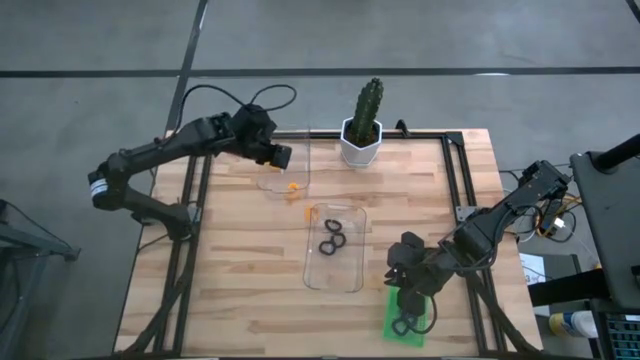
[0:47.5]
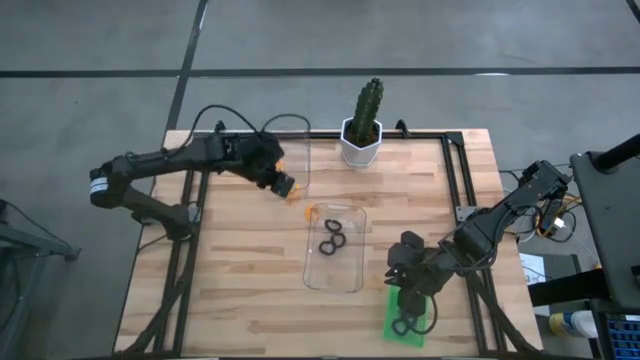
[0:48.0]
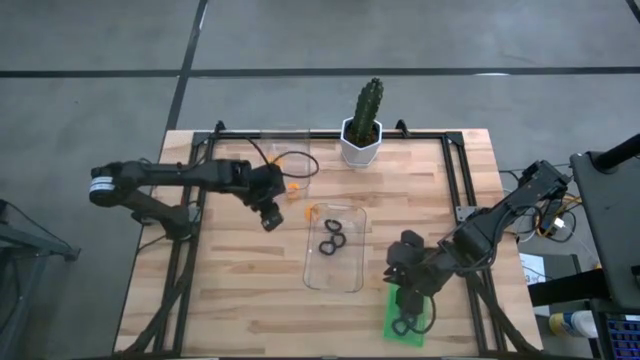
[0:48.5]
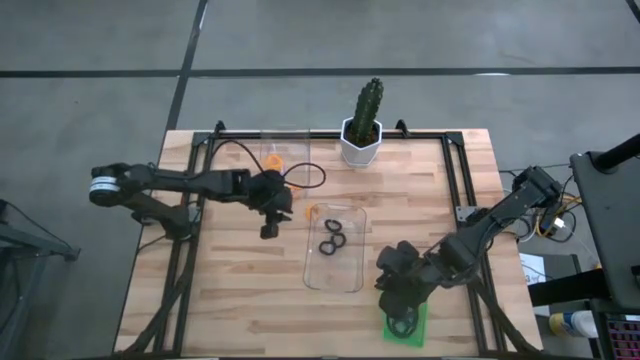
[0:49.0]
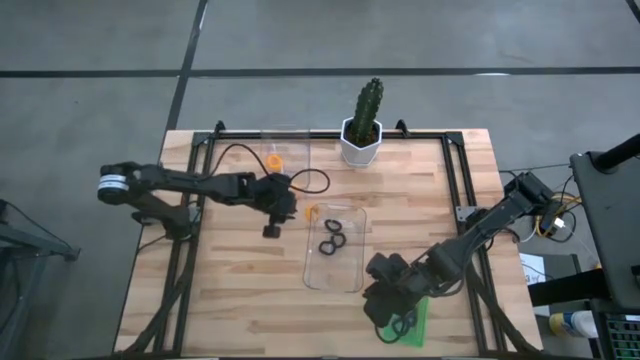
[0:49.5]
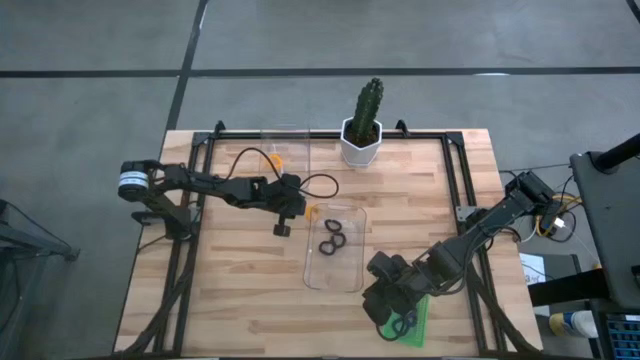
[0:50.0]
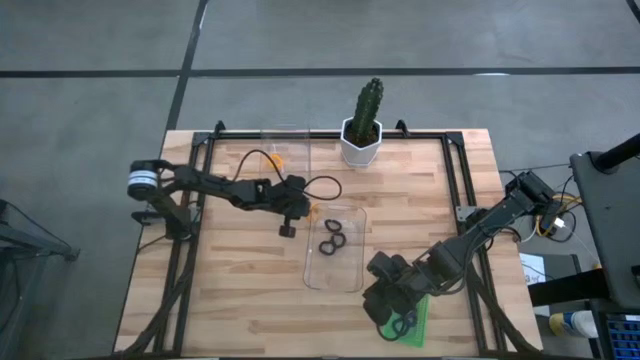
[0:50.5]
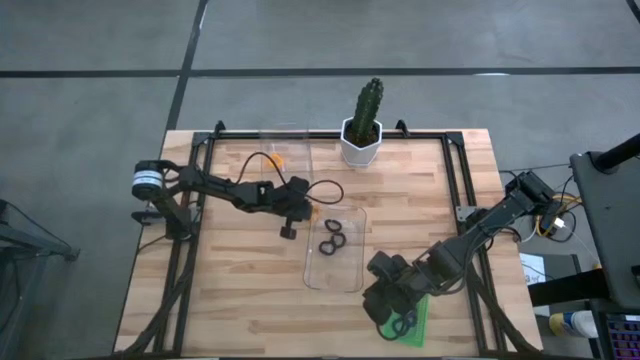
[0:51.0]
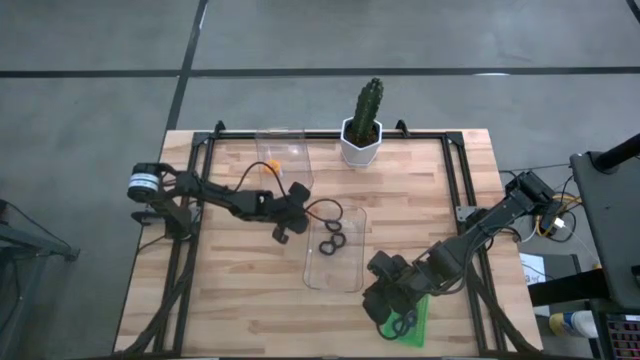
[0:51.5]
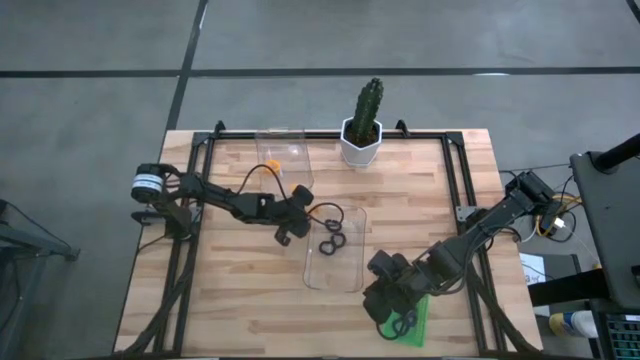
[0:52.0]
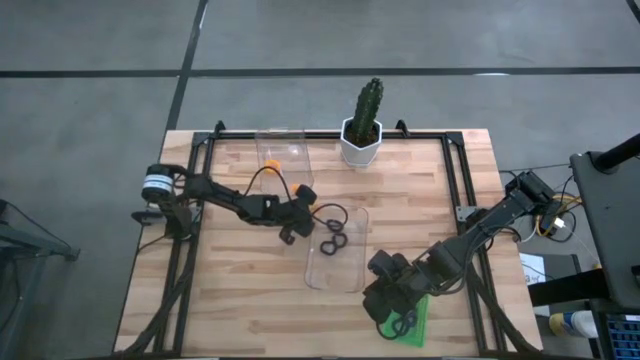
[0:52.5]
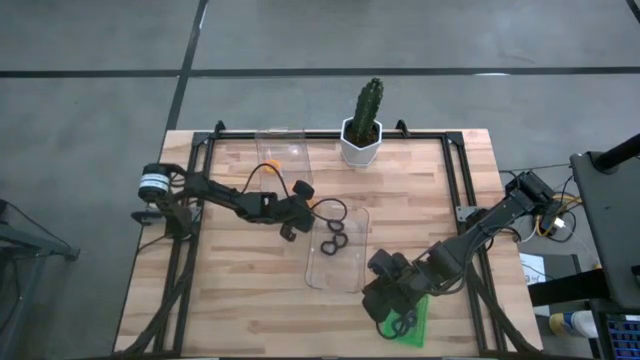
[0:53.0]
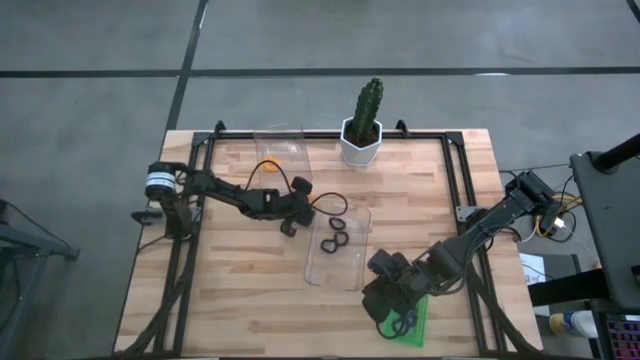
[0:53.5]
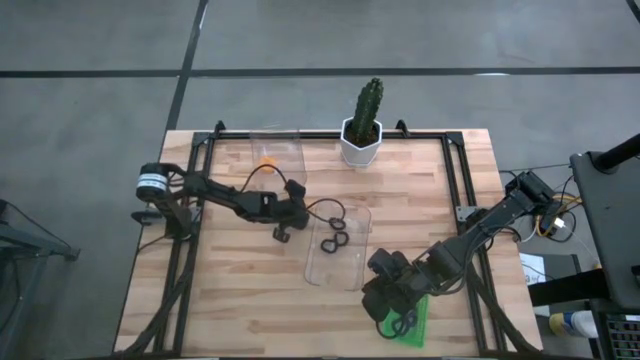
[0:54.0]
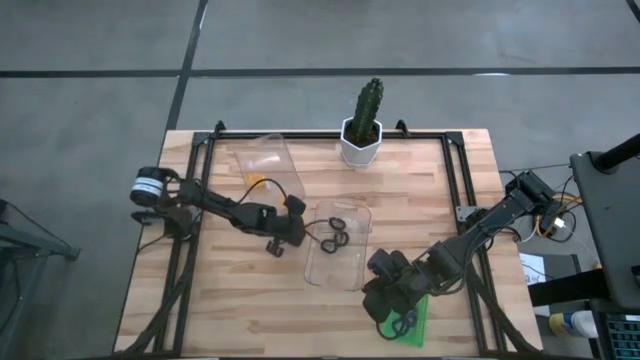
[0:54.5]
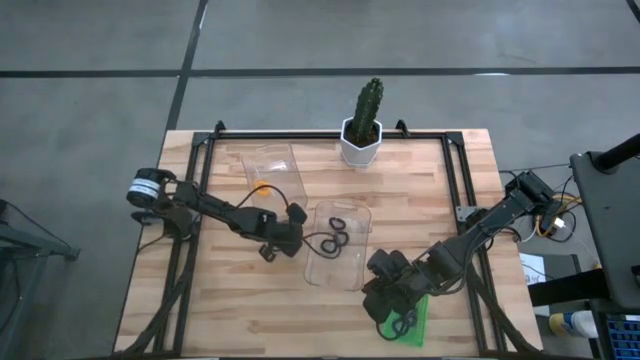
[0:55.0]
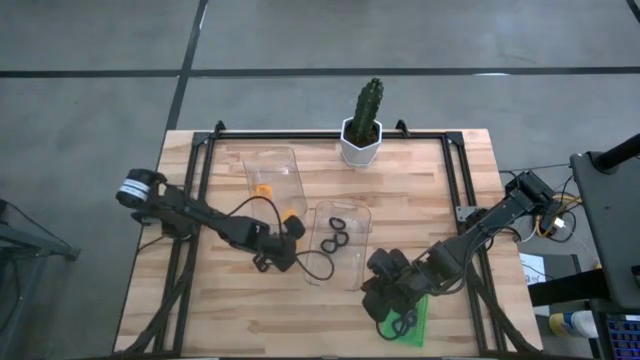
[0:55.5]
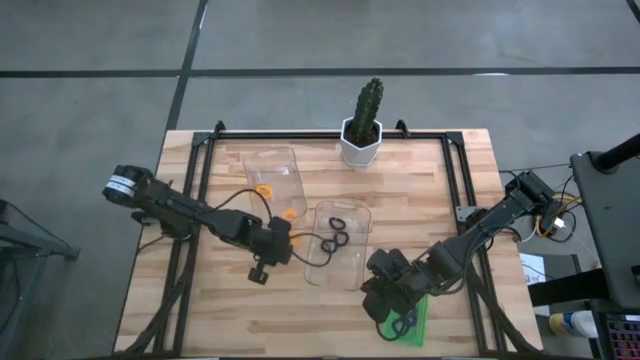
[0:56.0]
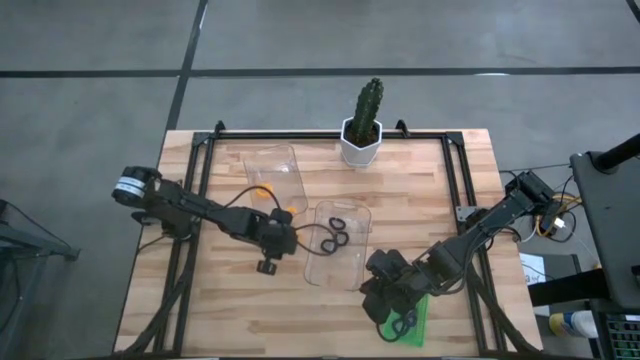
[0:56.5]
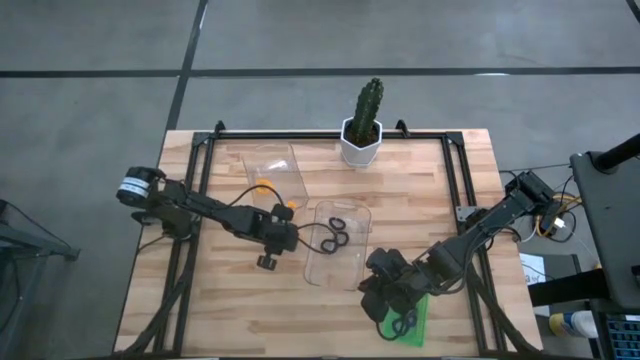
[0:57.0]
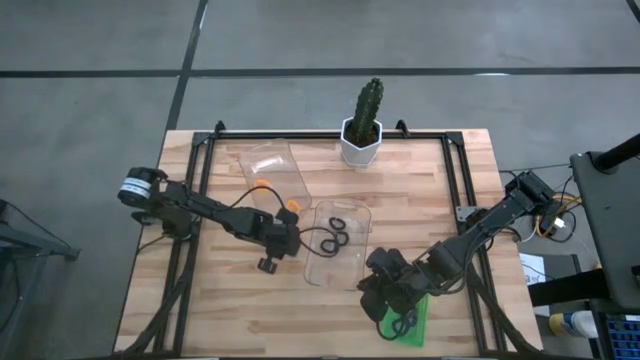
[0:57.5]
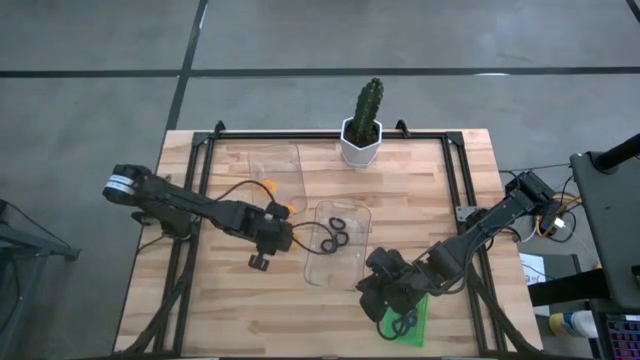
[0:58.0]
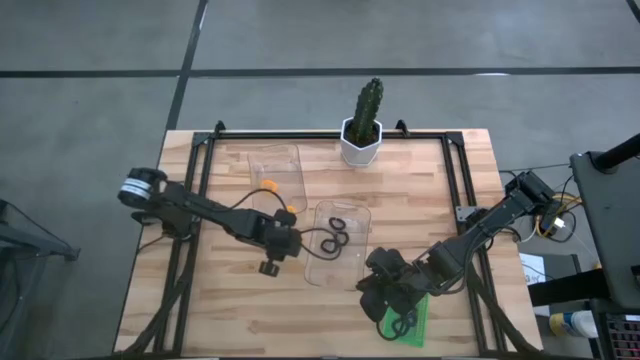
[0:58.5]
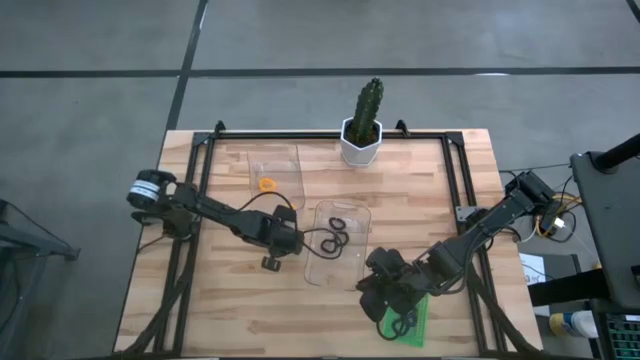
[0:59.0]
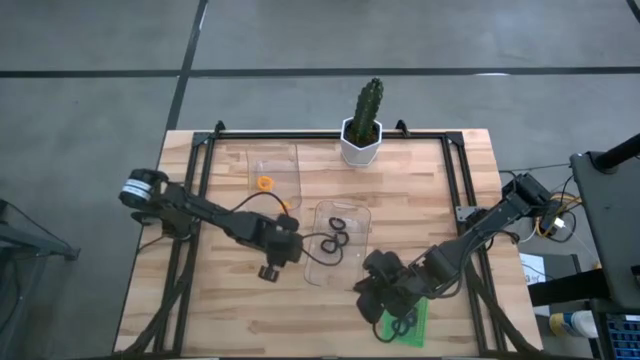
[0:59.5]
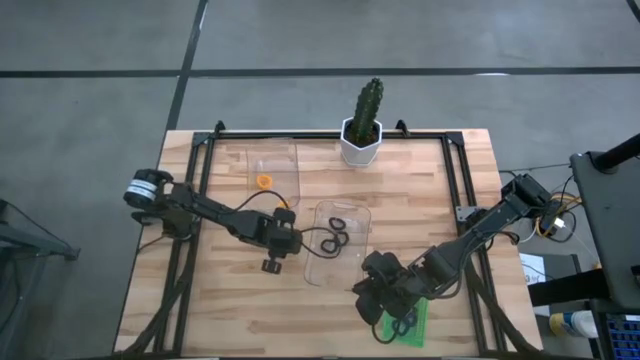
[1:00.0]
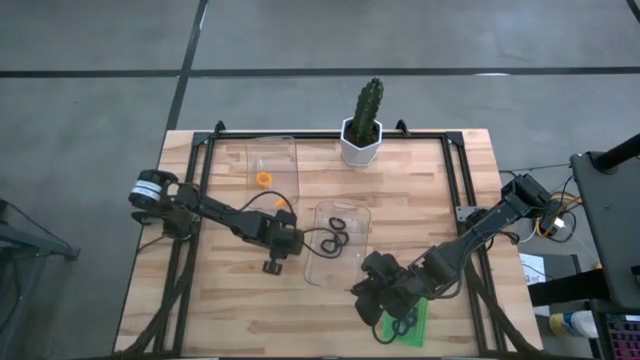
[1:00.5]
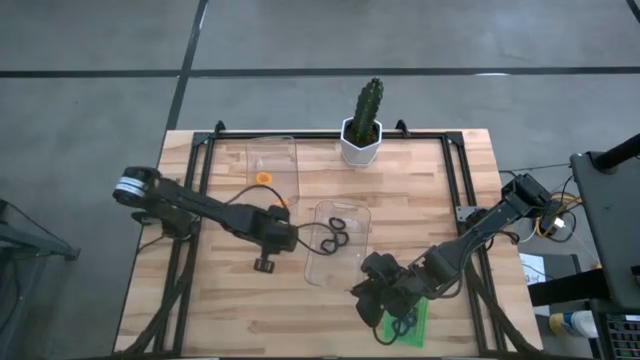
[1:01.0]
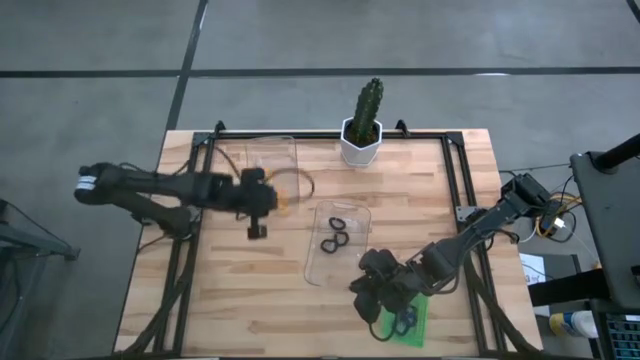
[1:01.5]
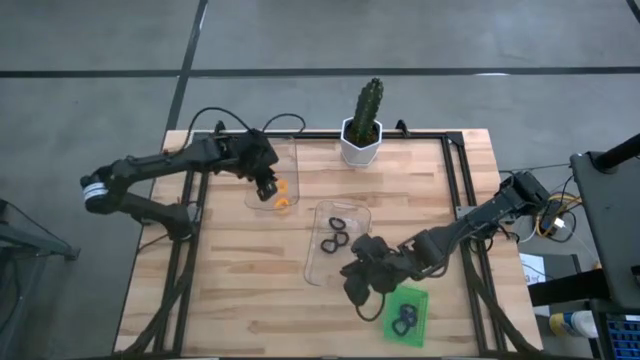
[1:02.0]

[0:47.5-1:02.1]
Task: Sort spring keychains
Put the yellow spring keychain into the top transparent bin

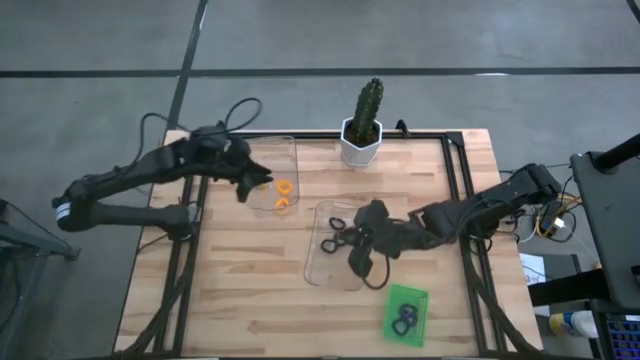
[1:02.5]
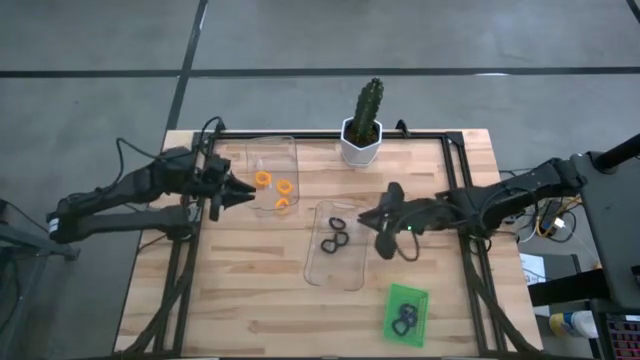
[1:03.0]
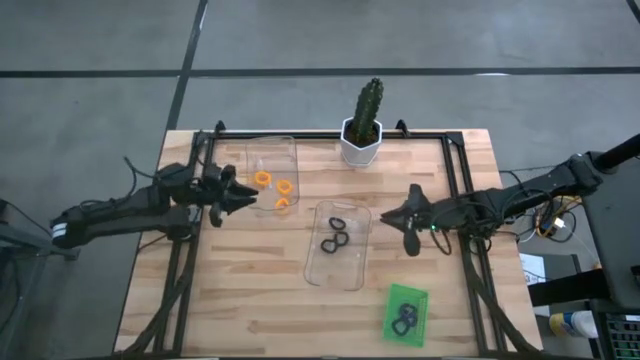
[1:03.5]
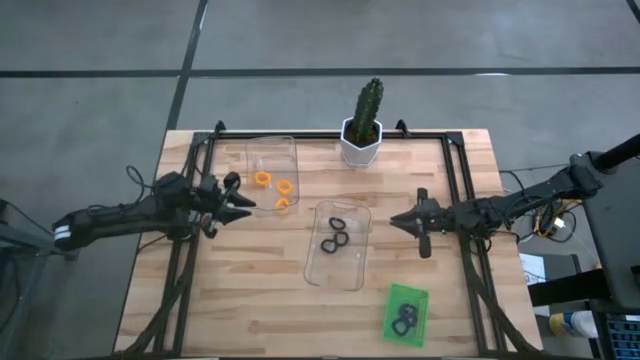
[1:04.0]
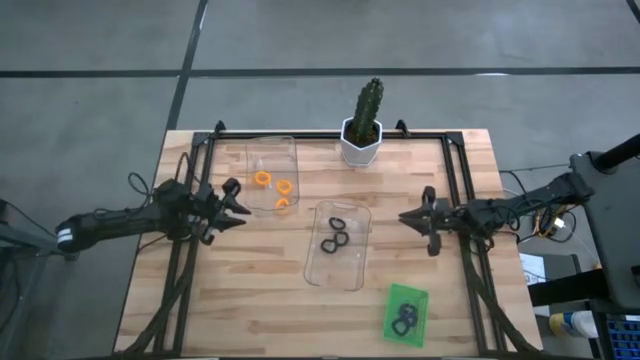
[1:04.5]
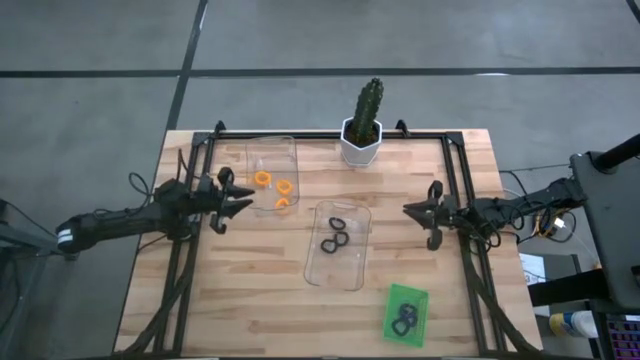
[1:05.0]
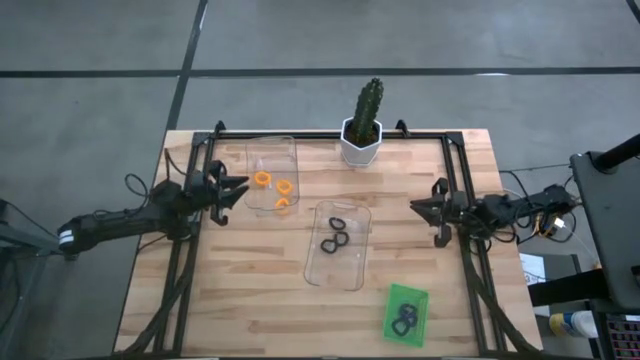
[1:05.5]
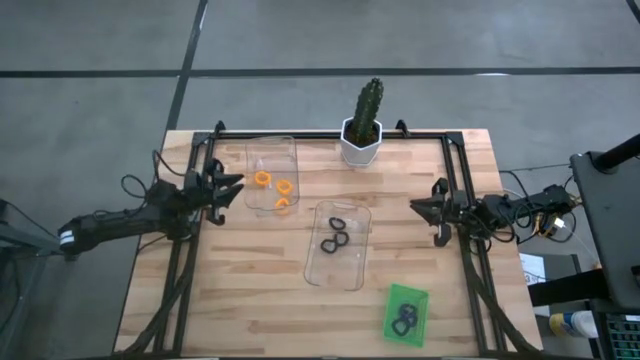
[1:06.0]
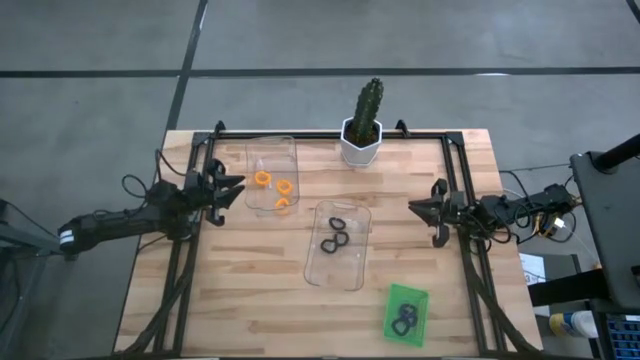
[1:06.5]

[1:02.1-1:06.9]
Return to Home Position

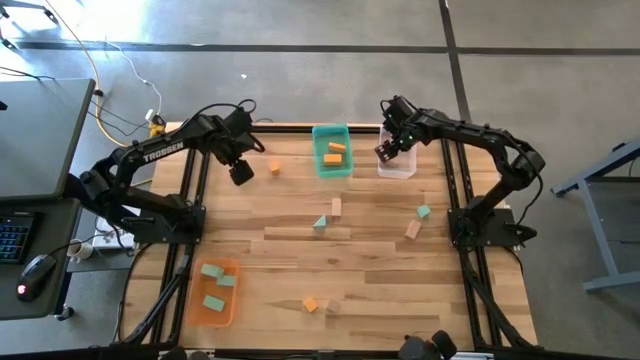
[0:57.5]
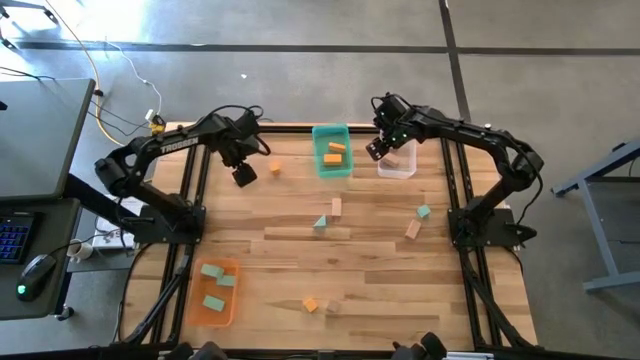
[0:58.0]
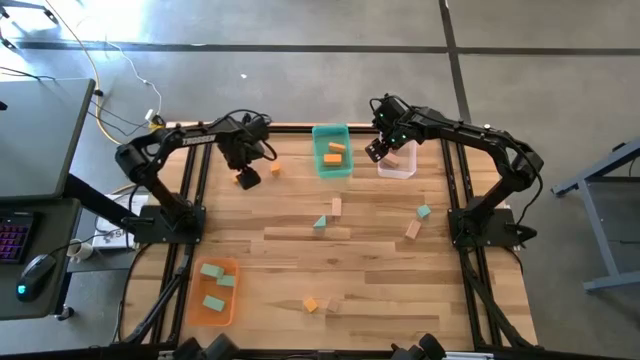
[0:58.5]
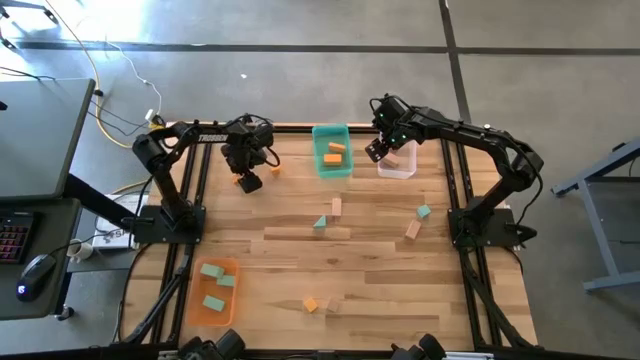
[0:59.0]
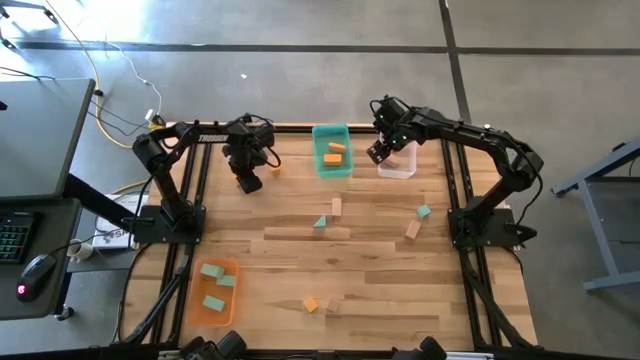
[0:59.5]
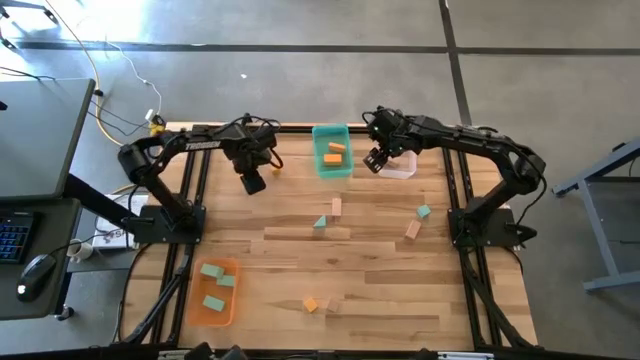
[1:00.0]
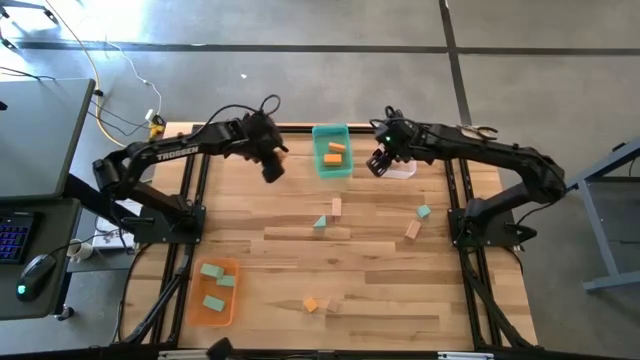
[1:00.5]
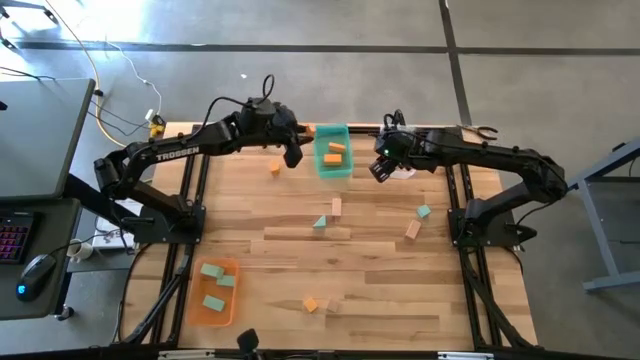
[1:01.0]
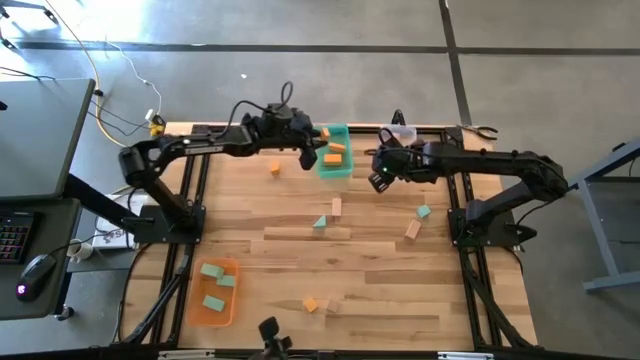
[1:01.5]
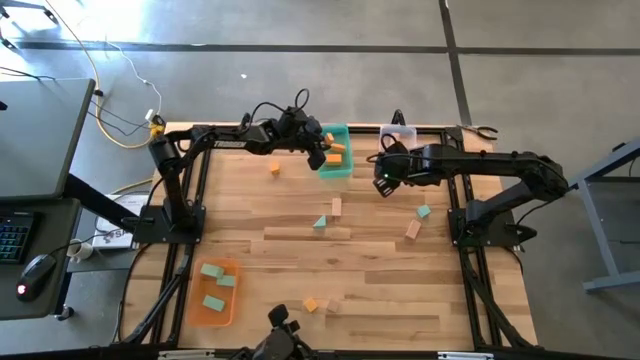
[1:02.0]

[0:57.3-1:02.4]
Task: Sort & place blocks by color
Put the yellow block into the blue bin
